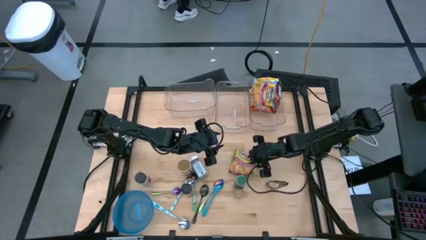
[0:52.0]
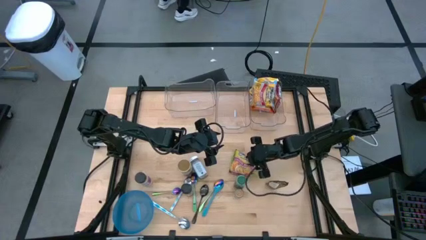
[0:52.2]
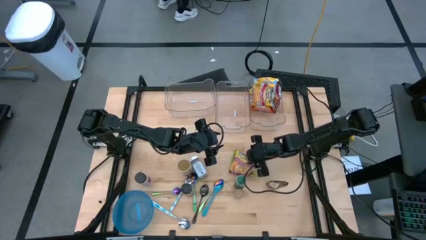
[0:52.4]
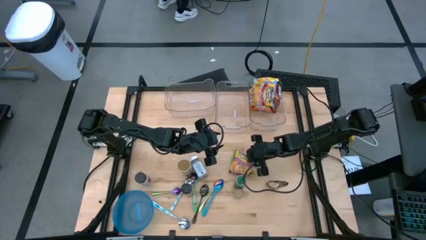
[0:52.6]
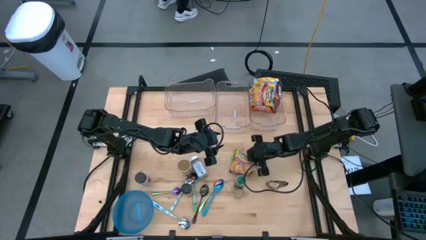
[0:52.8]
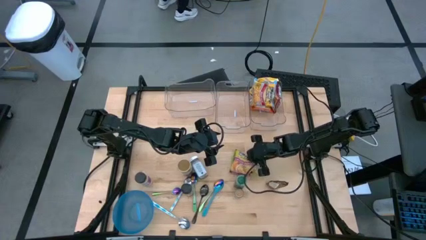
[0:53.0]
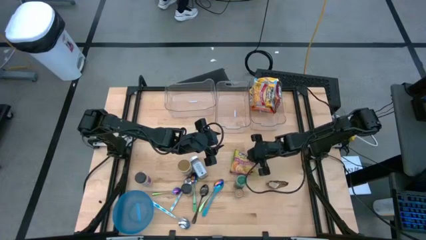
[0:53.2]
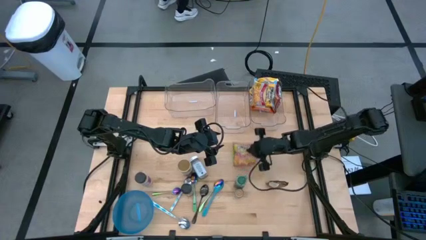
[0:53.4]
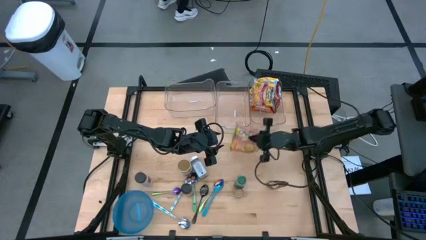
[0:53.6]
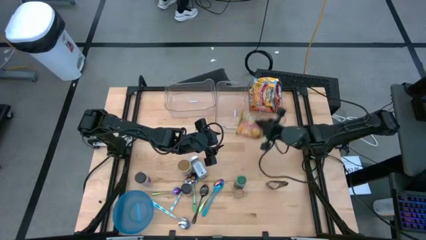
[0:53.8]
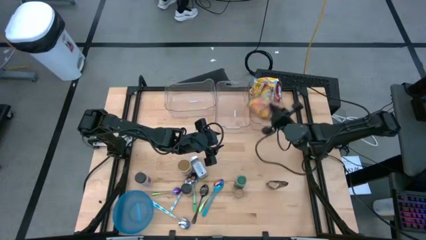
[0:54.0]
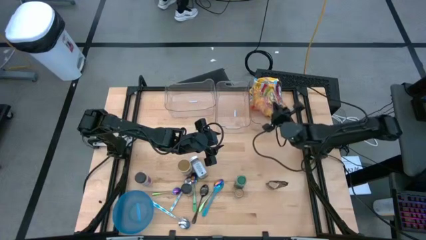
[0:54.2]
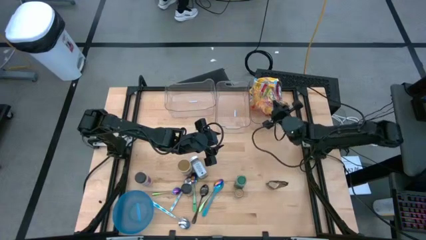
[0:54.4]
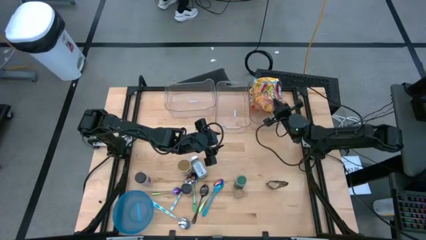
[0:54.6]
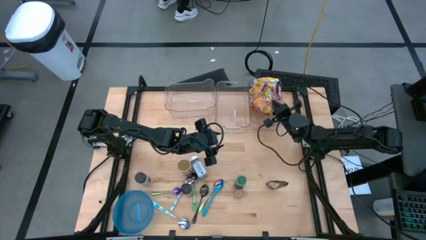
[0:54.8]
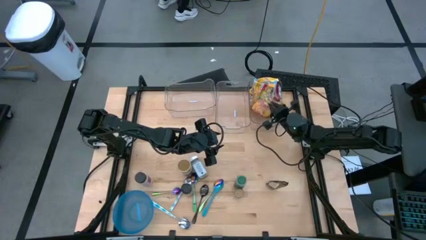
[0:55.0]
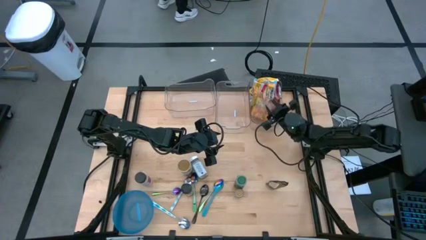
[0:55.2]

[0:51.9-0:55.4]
Task: Pick & Place Food Item
Put the green noodle pack into the right transparent bin

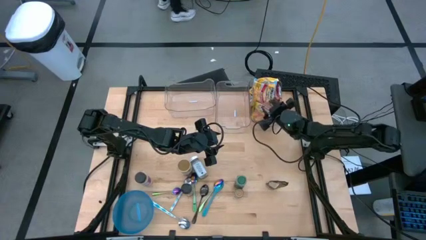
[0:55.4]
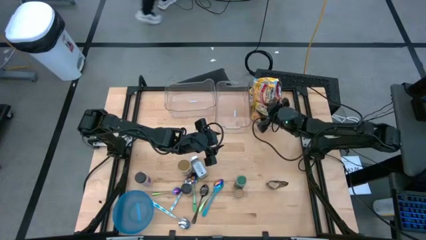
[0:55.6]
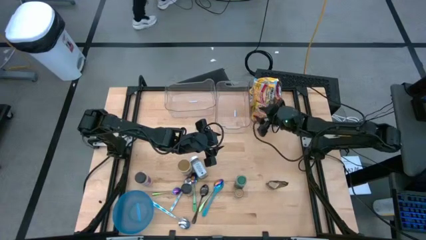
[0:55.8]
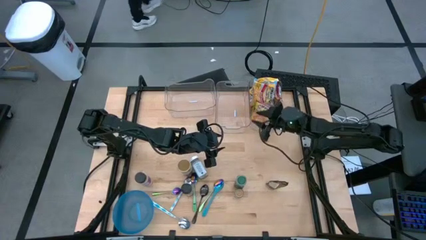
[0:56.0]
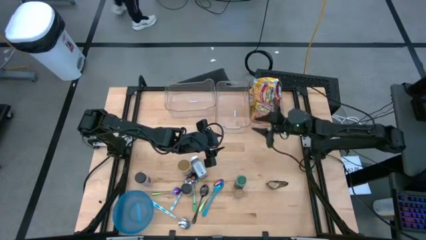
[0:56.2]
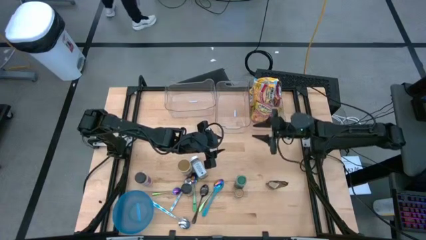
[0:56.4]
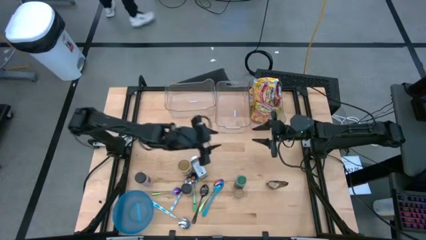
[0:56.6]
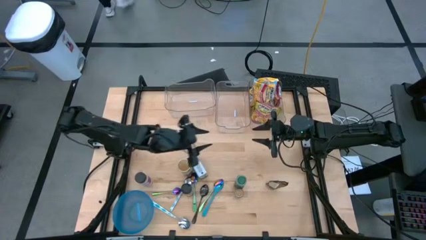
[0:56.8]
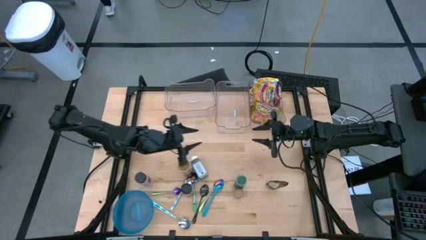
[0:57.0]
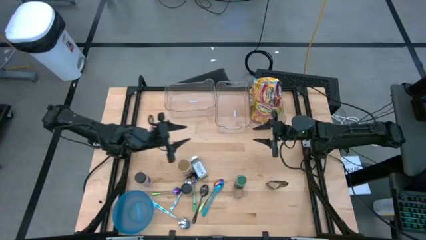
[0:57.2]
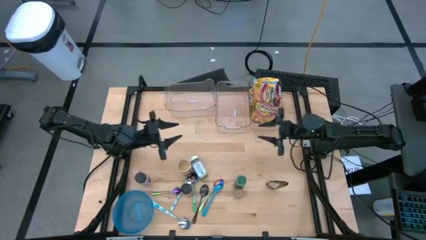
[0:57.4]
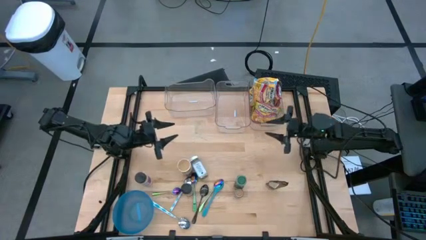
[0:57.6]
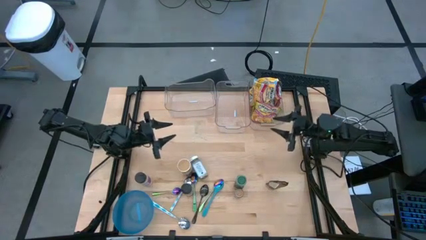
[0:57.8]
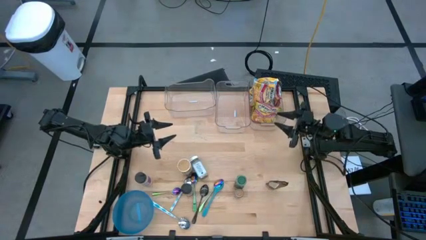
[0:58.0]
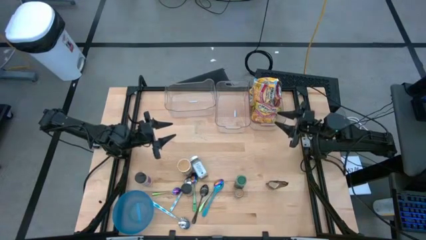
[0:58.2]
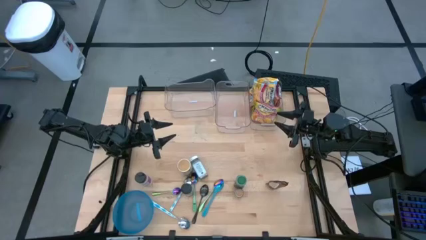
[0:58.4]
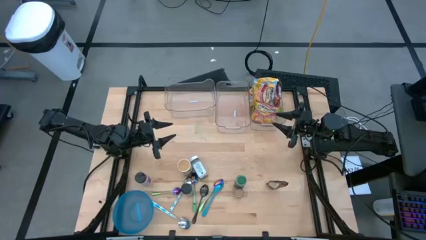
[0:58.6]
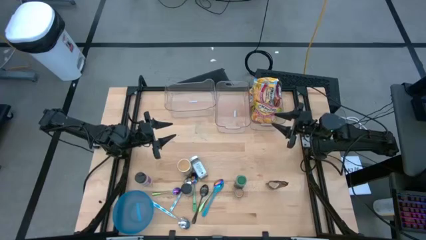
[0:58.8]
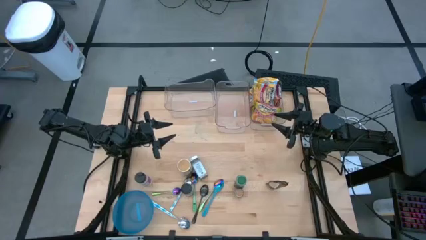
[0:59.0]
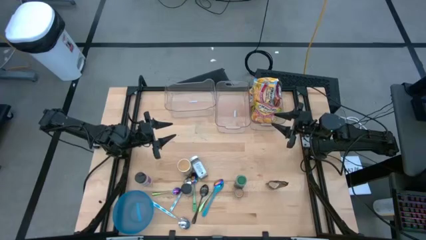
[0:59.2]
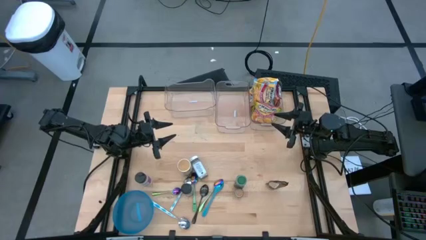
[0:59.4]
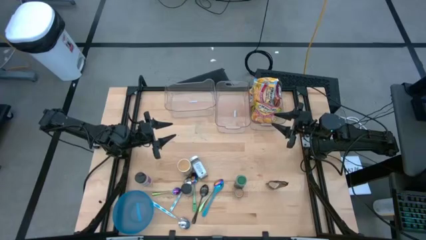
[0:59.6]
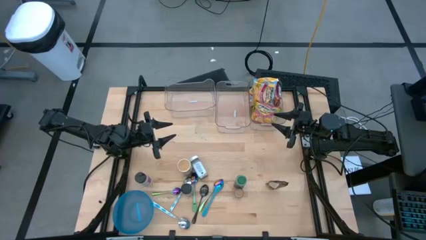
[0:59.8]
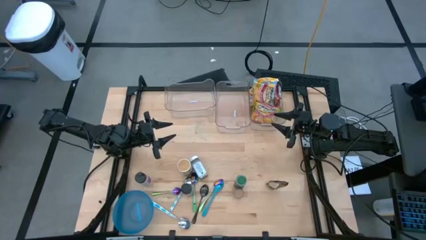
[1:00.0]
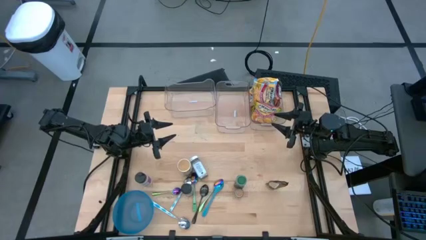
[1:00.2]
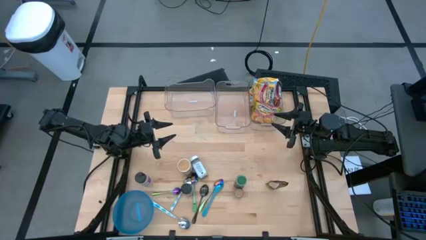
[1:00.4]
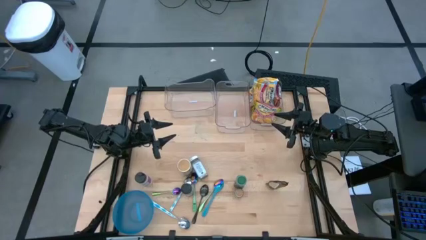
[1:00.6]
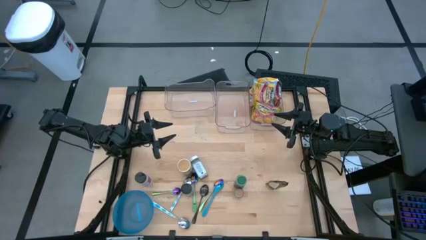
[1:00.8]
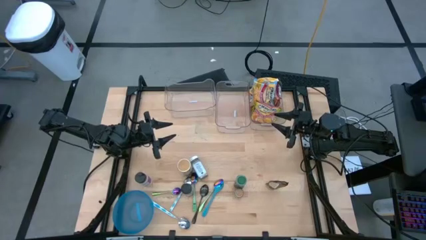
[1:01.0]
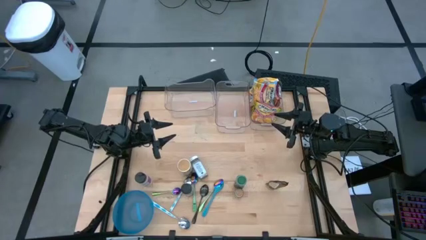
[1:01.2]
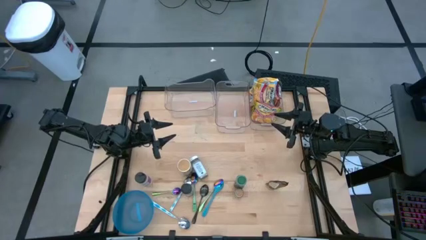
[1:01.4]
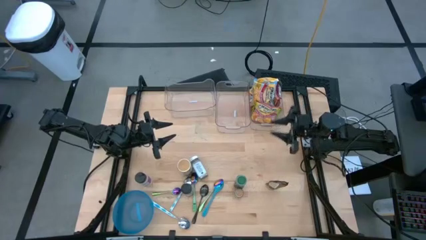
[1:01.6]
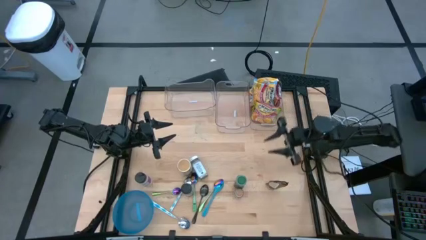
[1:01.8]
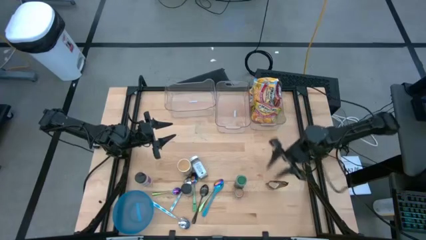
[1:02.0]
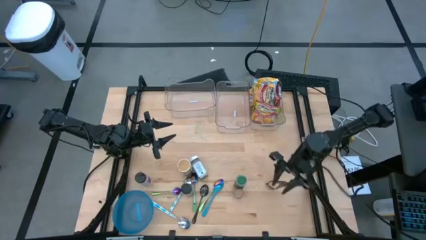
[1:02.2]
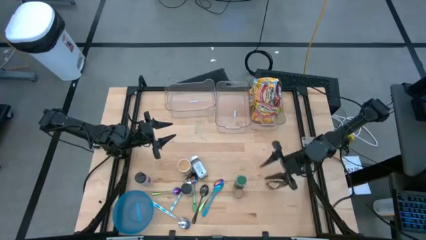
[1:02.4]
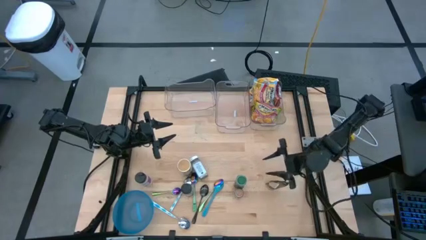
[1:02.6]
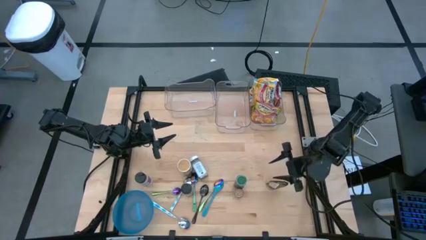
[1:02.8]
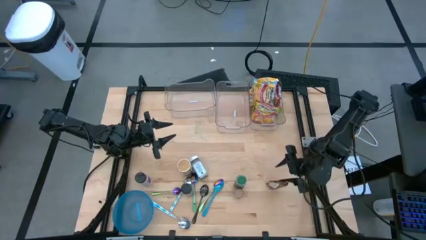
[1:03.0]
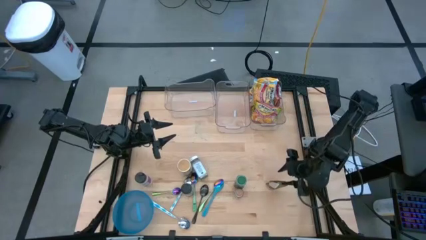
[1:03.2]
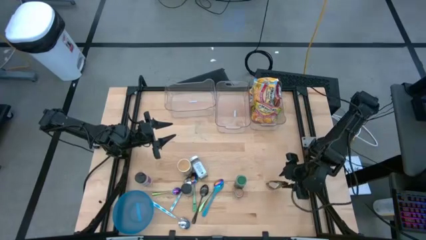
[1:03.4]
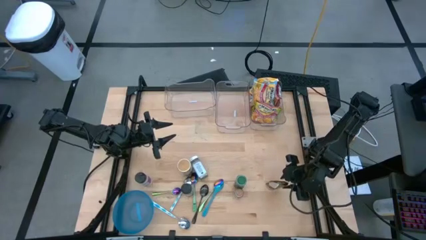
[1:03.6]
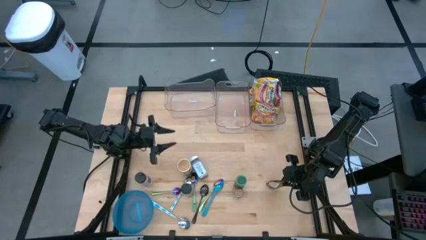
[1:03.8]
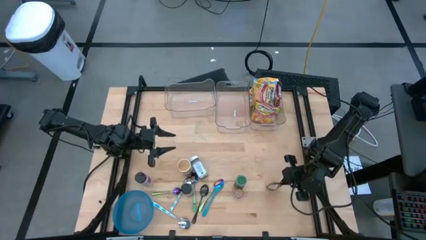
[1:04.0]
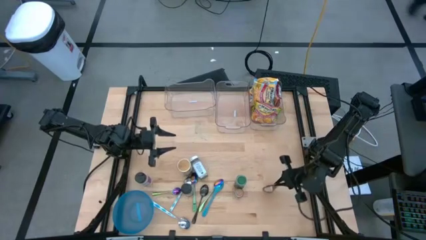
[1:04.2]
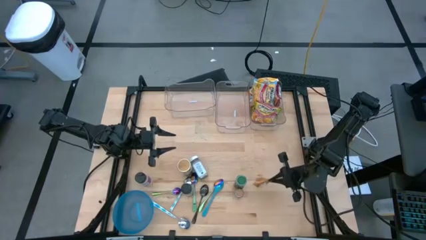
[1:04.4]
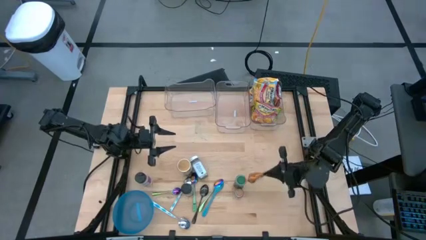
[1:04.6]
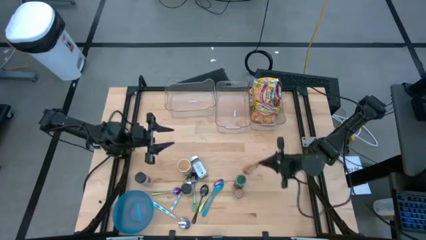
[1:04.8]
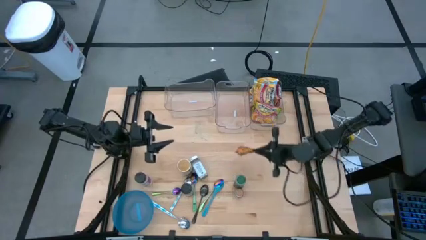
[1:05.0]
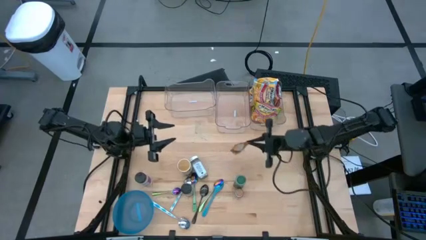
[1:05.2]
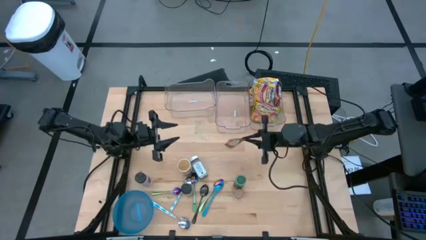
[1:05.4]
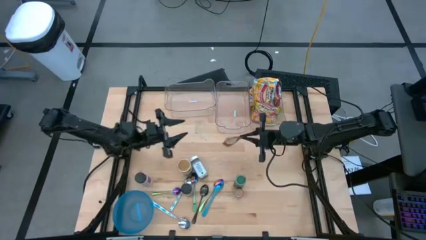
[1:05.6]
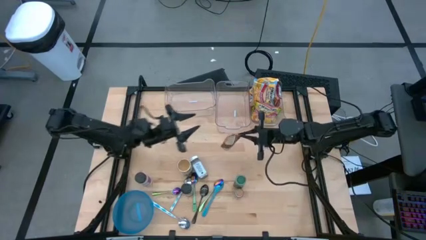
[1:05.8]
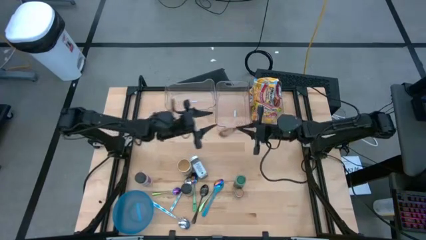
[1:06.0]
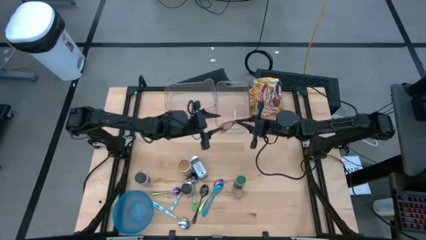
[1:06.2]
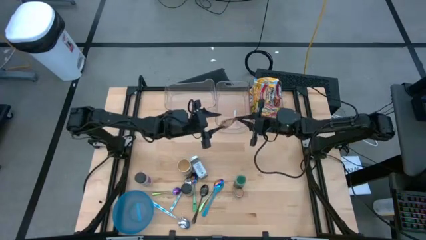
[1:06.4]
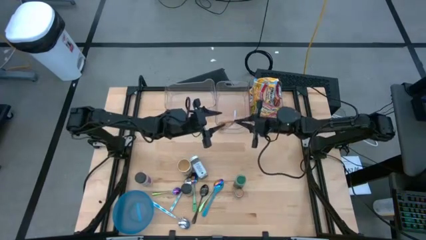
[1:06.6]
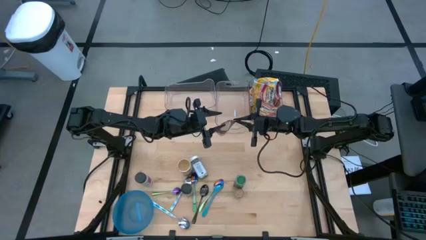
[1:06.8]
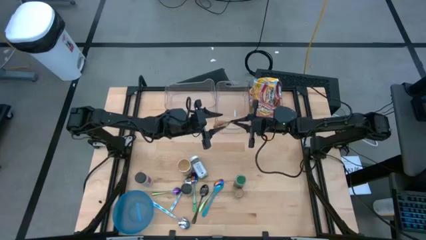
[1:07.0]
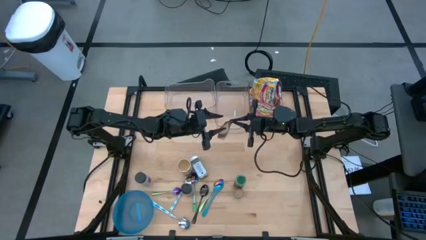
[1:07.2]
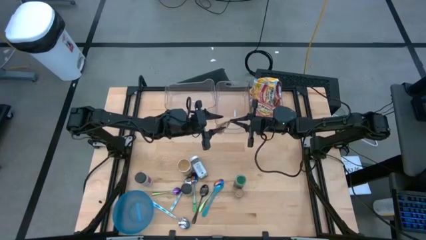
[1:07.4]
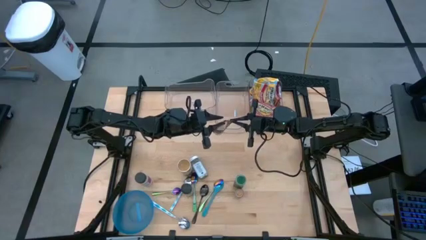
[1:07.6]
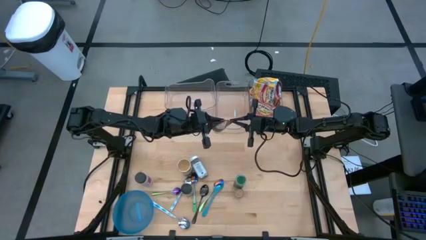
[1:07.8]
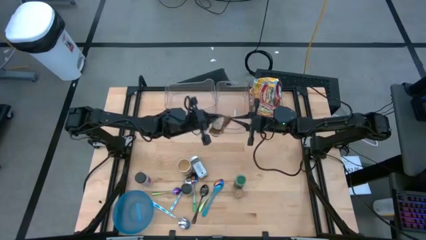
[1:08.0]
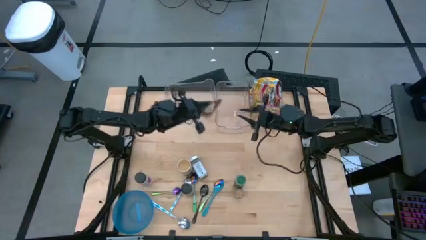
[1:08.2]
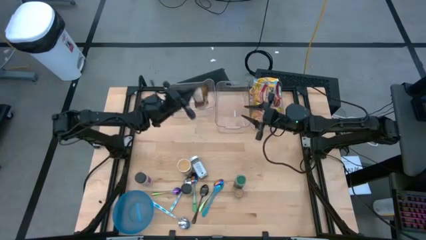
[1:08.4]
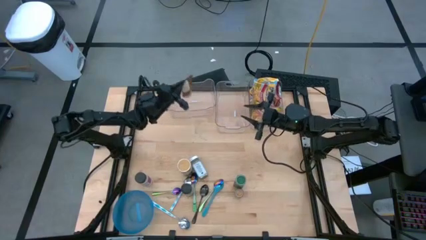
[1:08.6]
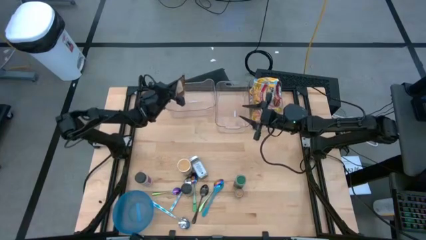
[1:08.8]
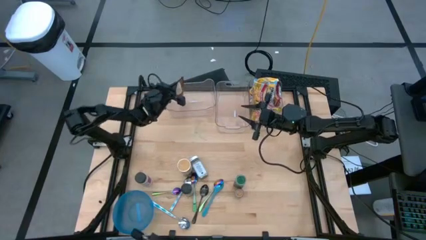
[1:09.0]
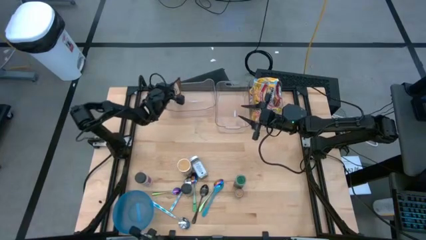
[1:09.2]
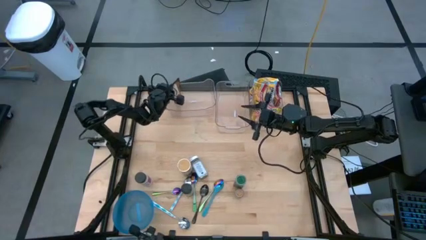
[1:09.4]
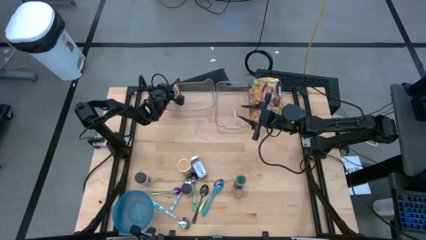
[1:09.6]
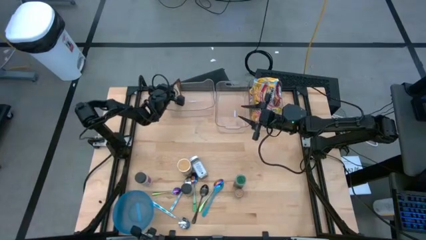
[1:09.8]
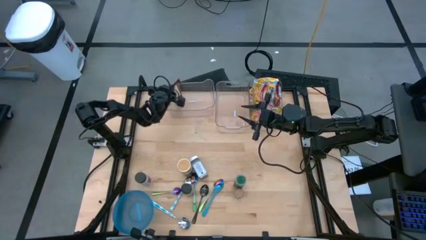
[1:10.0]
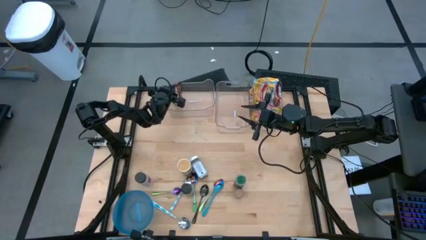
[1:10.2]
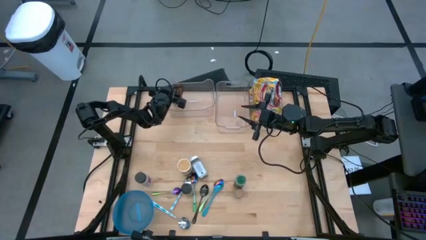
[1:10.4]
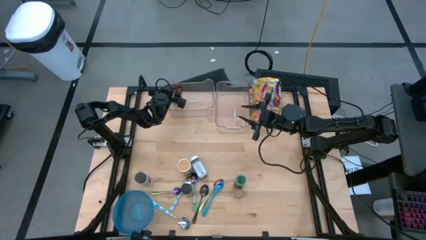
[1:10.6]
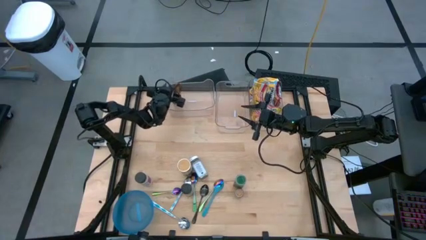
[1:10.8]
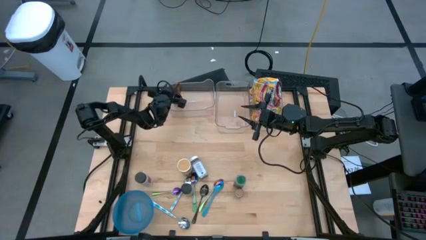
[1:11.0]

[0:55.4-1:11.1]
Put the orange seasoning pack into the left transparent bin
